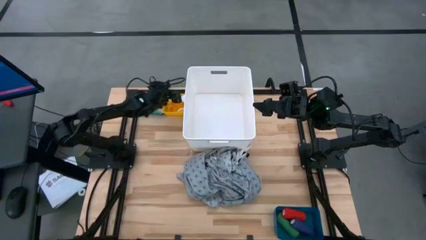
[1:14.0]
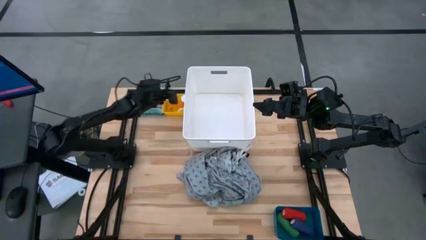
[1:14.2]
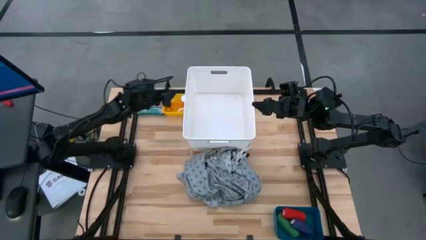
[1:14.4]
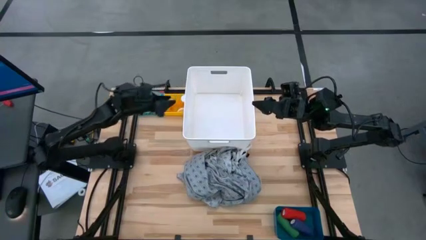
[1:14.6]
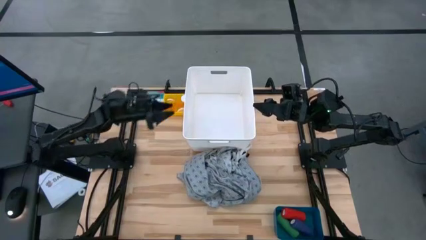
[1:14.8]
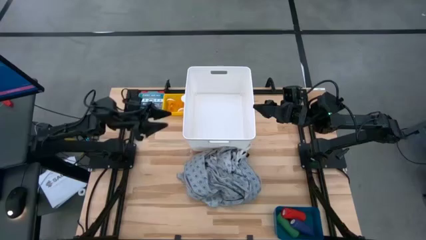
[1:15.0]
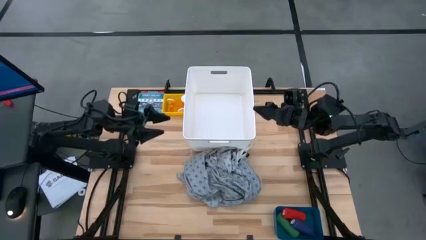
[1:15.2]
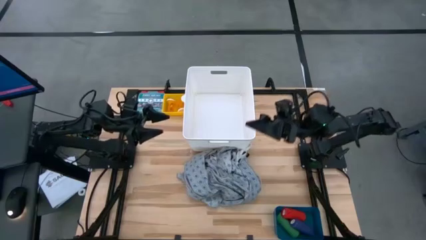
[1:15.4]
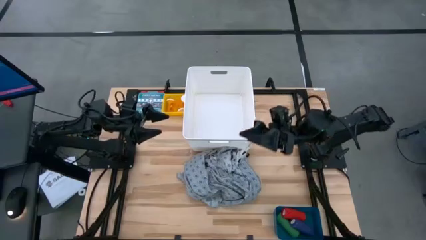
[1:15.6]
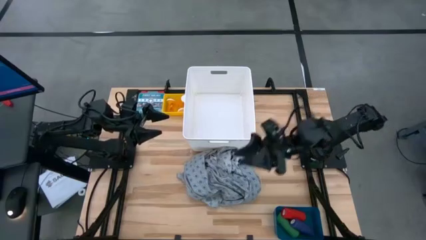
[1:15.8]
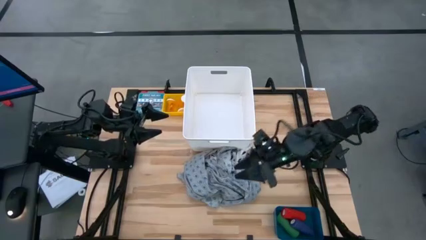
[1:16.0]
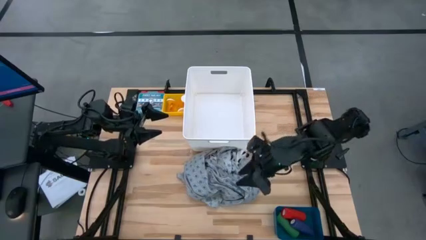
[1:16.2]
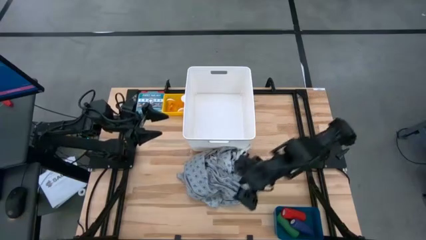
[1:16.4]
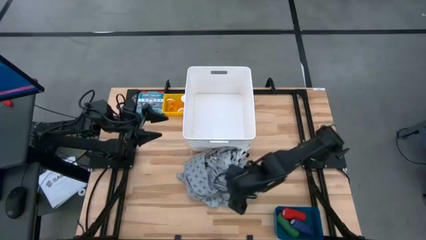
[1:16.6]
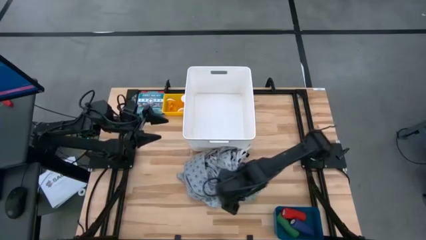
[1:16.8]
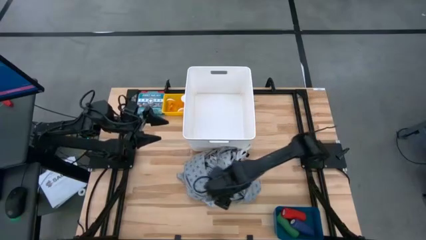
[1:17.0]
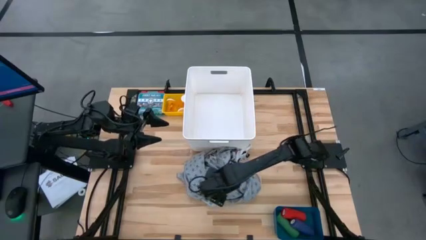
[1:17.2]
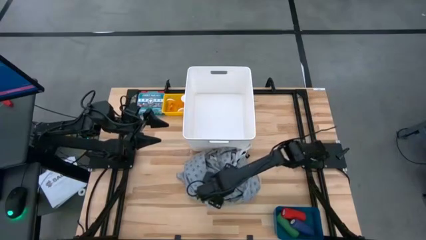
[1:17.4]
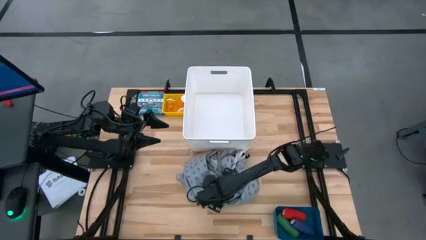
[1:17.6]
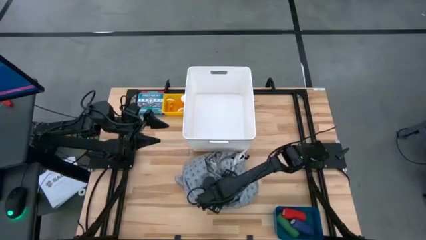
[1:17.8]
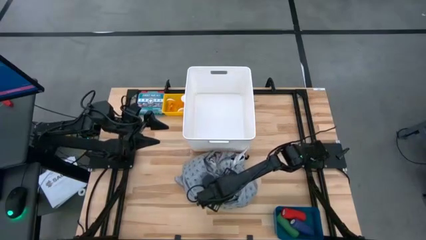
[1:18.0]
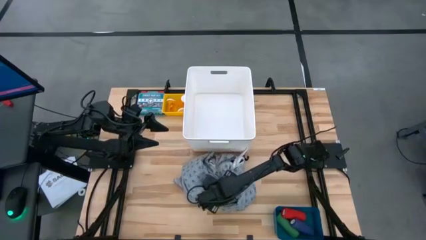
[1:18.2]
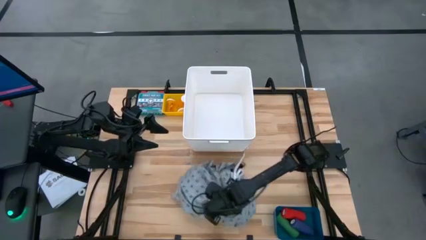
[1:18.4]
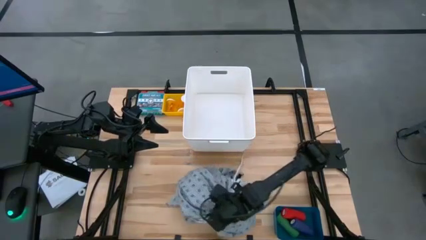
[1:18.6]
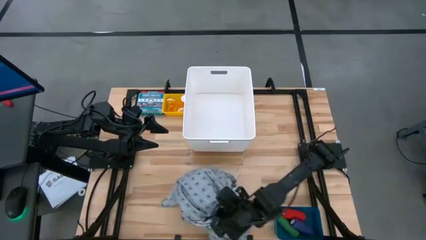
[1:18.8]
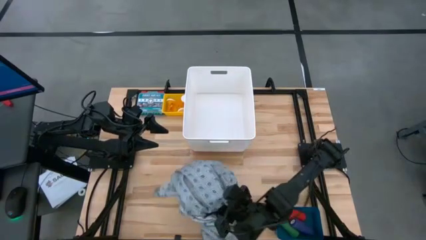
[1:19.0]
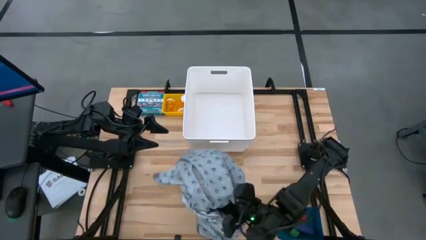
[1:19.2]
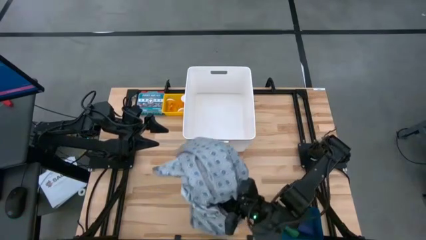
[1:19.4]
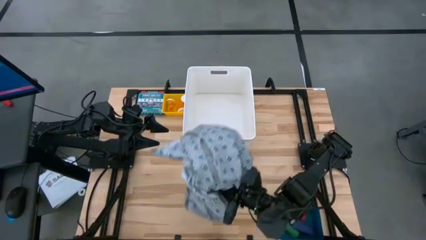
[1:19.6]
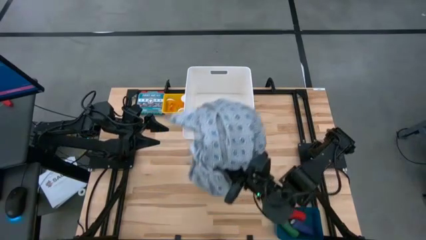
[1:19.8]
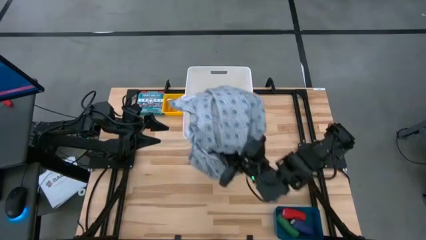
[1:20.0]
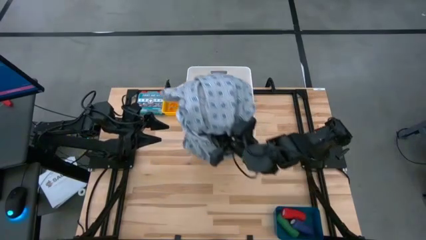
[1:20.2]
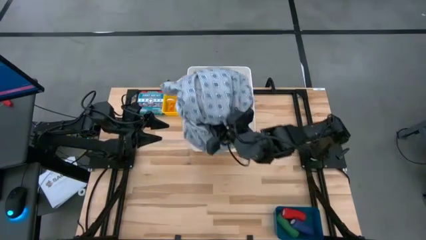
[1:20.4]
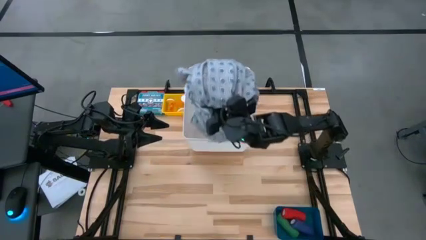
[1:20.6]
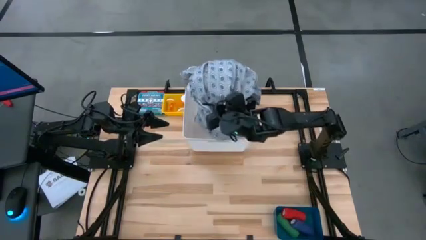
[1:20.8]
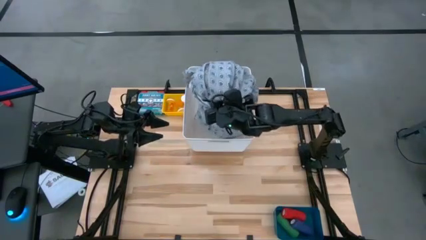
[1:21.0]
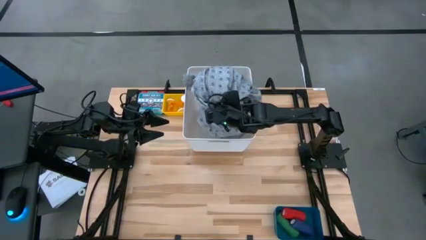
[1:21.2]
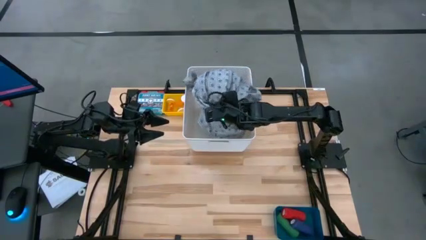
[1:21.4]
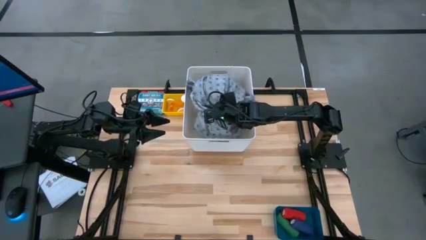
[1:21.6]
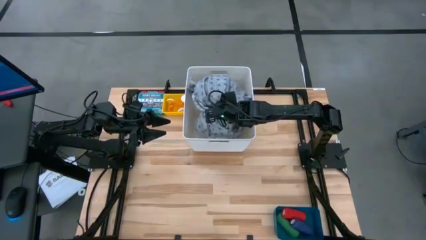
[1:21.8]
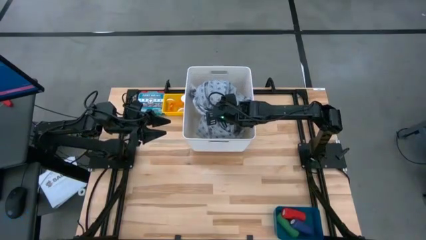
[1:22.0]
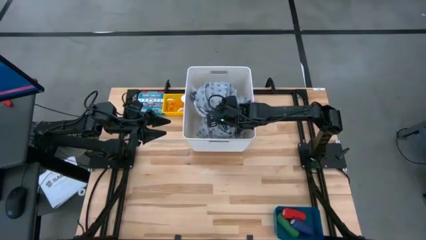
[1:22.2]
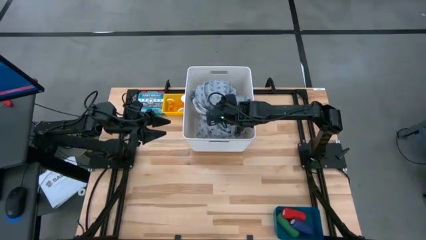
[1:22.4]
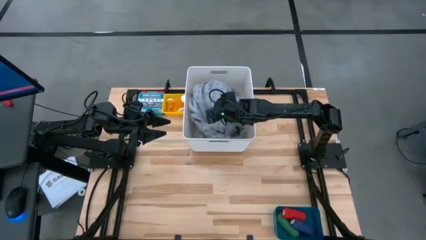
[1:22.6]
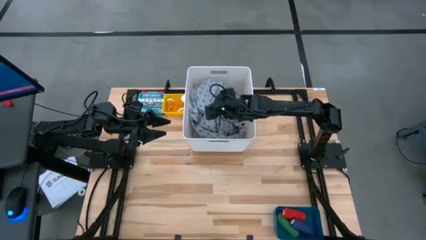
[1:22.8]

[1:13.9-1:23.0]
Task: Pick & place medical supplies in basket/bin
Put the blue patient gown into the white bin

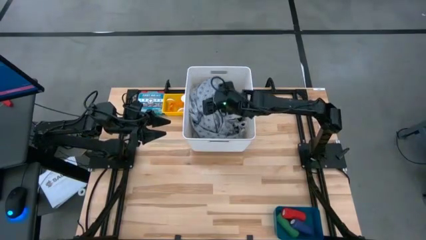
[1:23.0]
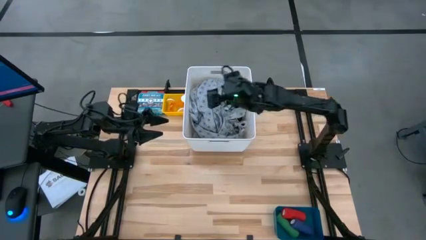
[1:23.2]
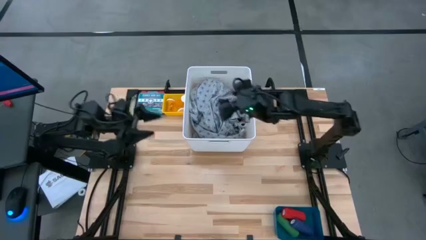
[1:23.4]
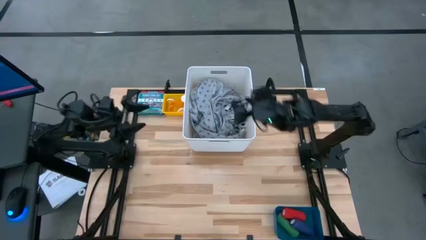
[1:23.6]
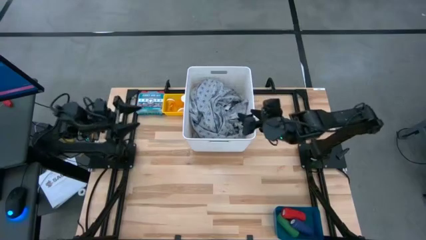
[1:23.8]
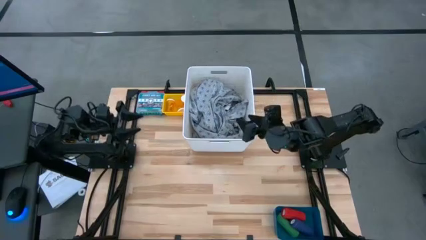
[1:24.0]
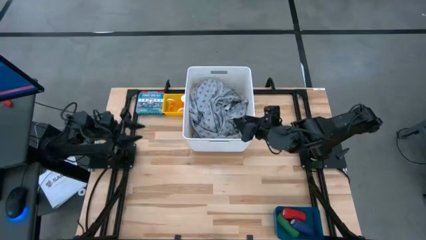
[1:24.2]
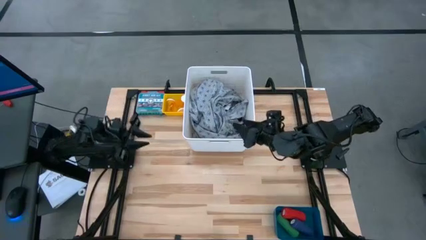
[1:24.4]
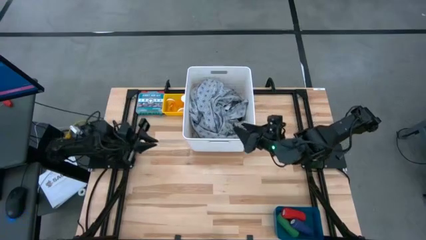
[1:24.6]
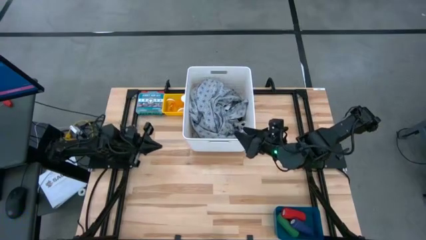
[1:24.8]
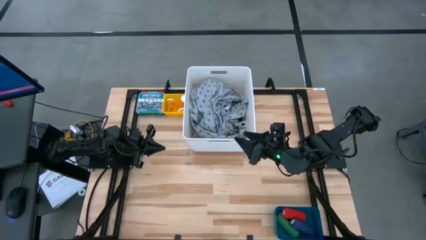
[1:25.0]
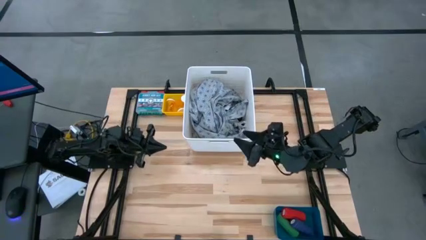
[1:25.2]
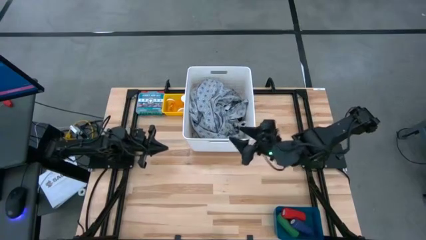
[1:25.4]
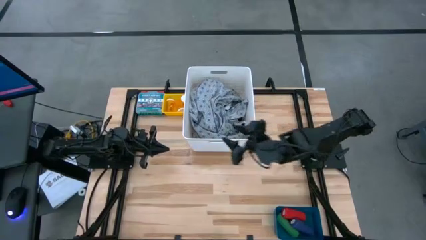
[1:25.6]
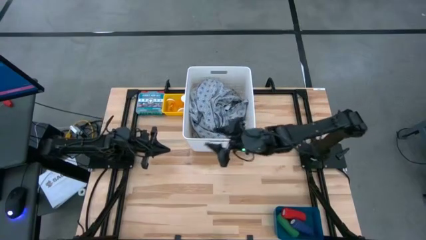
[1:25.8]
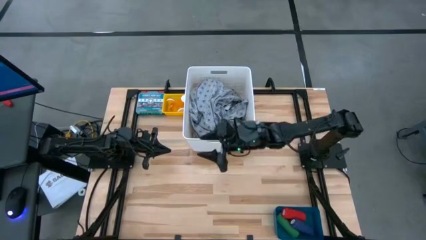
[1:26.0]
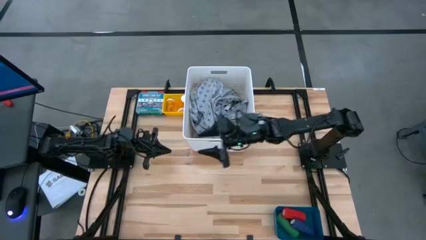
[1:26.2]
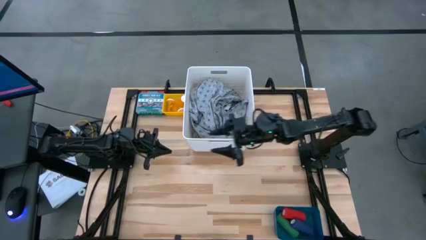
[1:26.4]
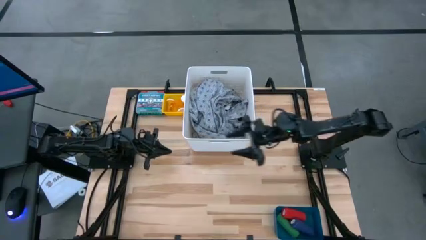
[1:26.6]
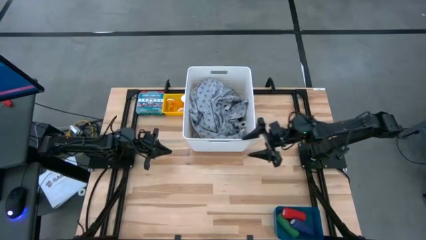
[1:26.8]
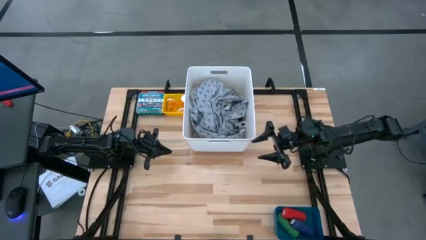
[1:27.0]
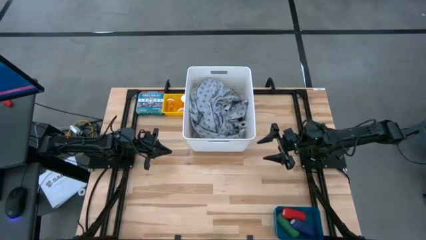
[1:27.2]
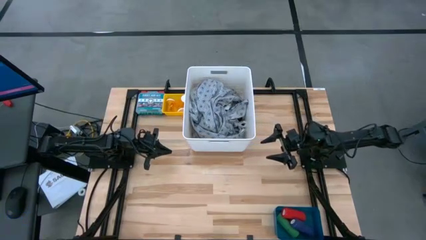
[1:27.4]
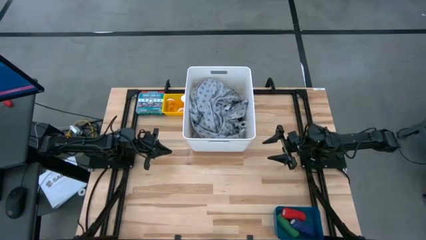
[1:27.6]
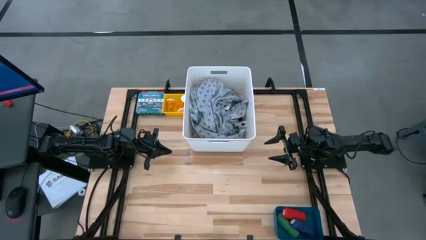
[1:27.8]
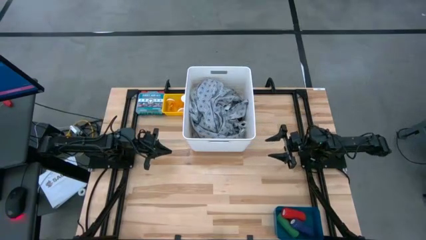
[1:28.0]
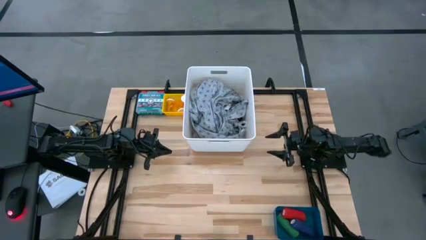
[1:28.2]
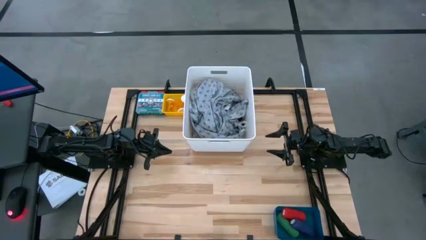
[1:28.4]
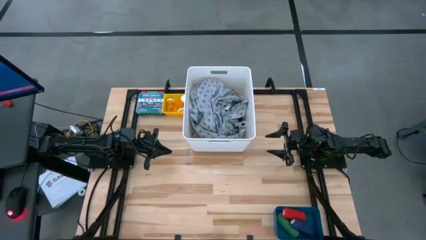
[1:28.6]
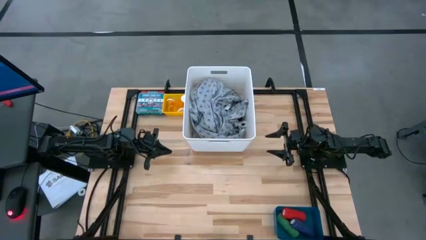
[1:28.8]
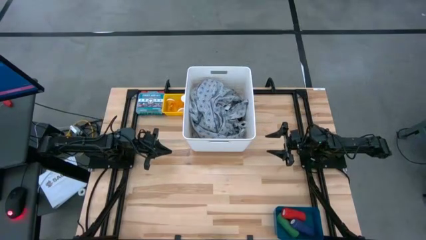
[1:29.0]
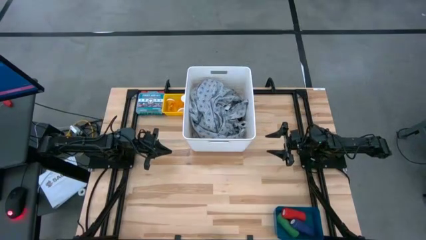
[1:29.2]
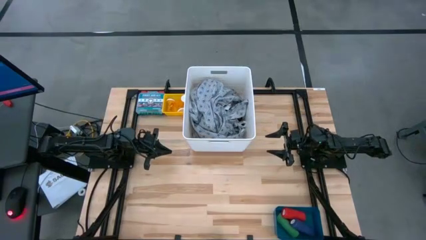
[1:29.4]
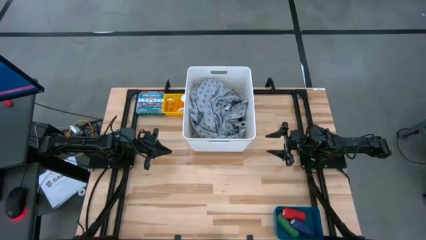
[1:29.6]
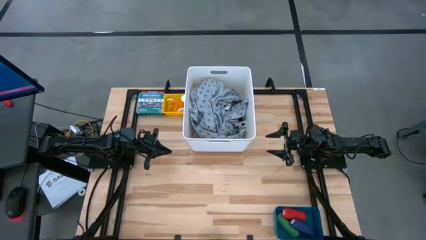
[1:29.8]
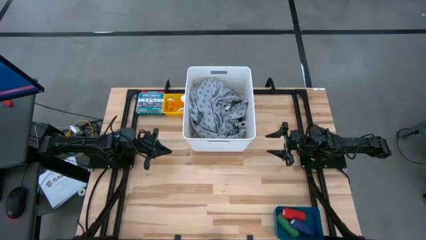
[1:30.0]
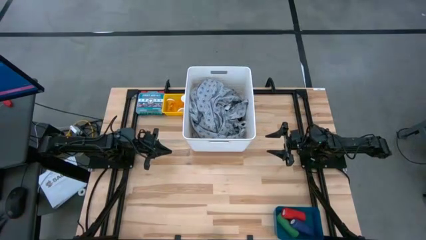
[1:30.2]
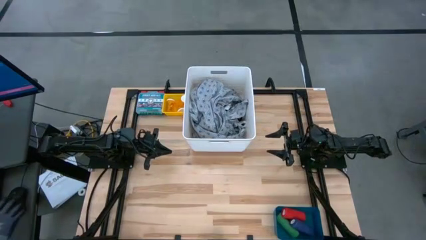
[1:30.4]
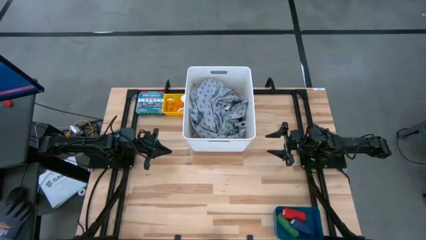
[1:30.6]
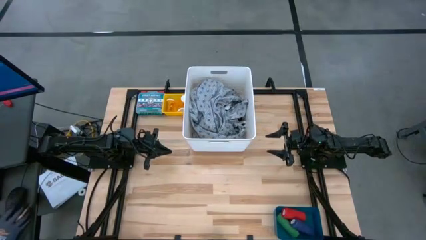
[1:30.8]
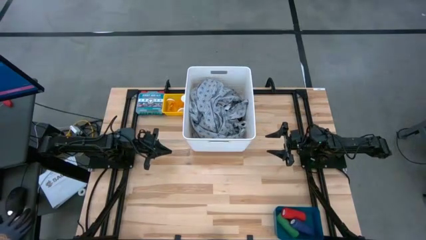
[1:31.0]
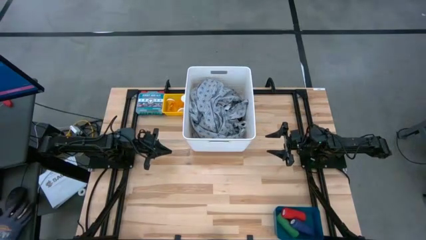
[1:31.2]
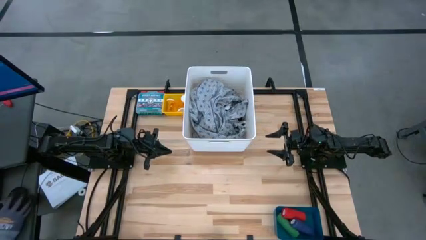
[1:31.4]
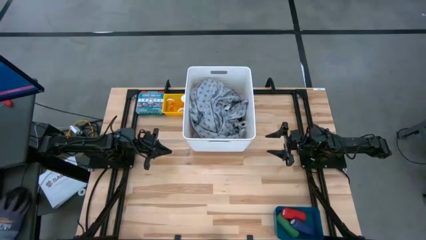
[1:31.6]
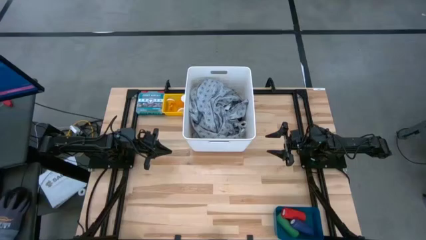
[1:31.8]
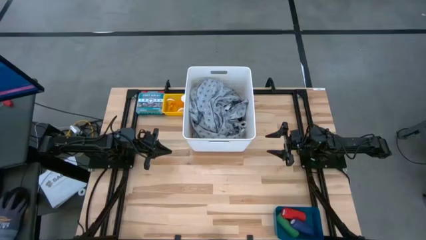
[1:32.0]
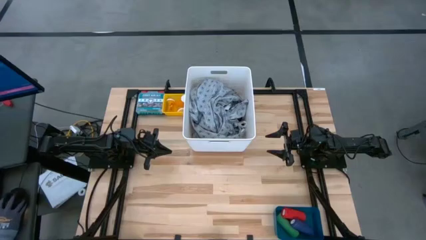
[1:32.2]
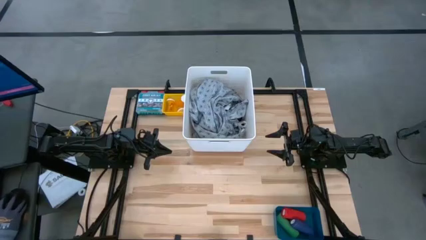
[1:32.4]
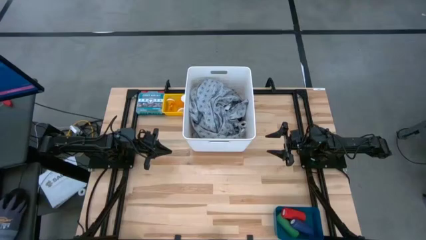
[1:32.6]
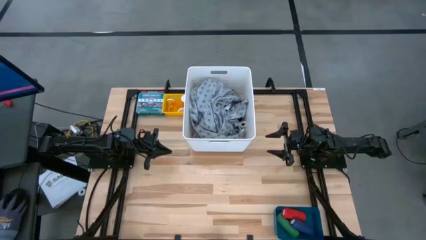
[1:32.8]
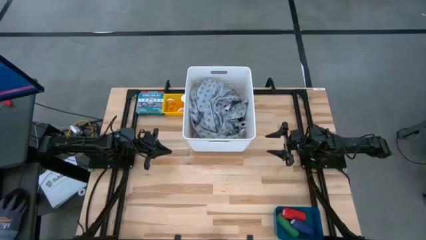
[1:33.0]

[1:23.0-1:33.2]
Return to Home Position
